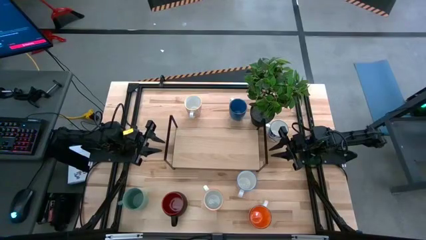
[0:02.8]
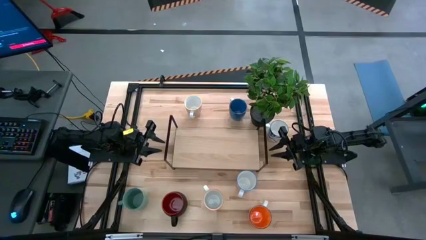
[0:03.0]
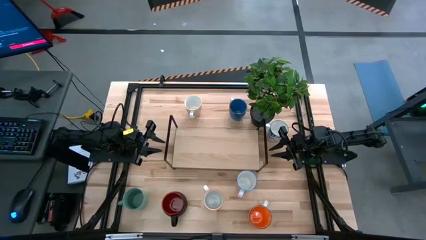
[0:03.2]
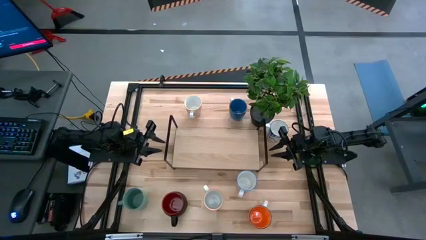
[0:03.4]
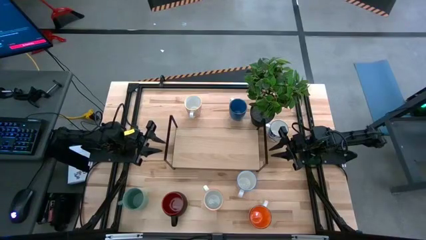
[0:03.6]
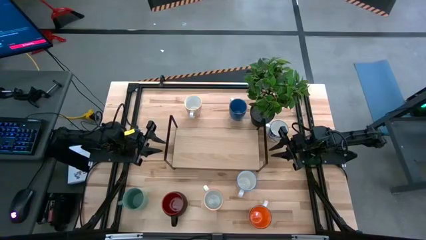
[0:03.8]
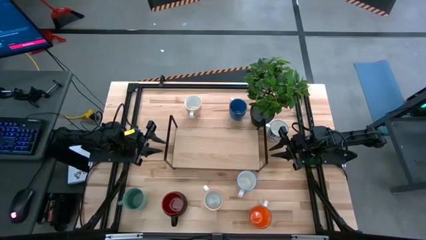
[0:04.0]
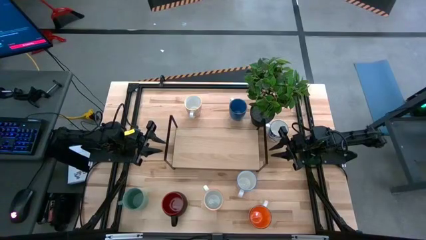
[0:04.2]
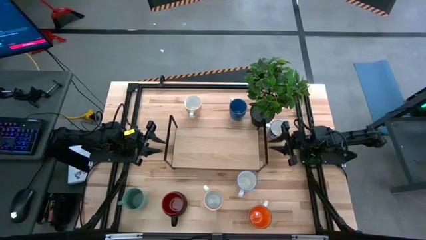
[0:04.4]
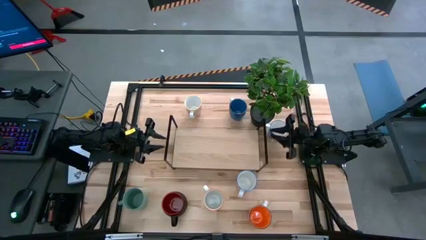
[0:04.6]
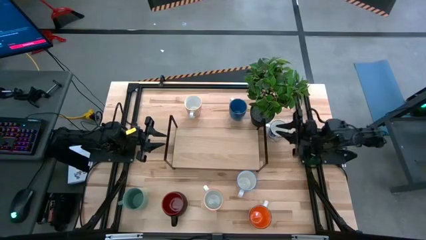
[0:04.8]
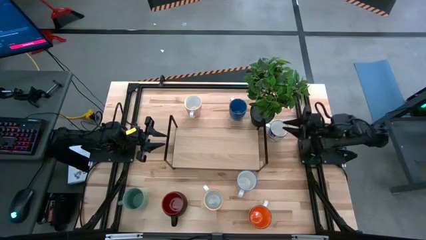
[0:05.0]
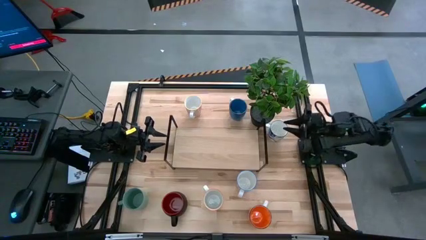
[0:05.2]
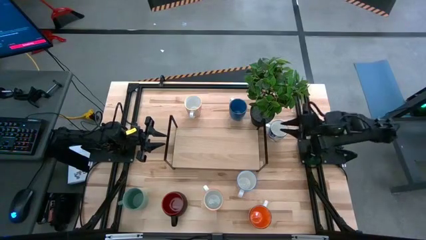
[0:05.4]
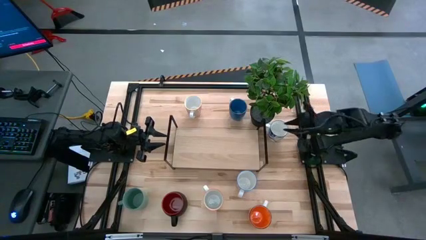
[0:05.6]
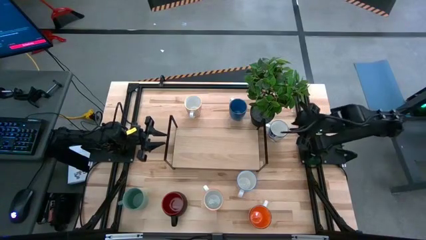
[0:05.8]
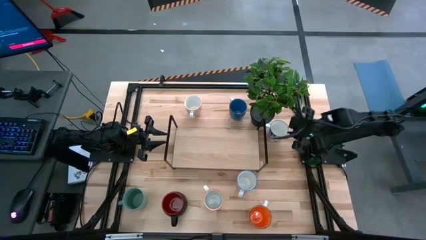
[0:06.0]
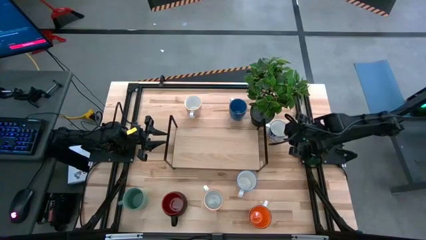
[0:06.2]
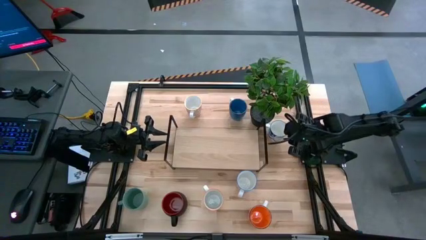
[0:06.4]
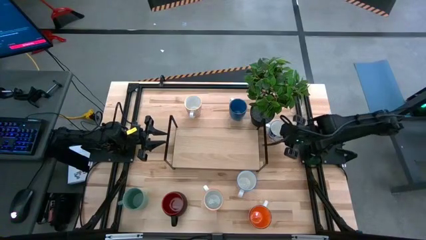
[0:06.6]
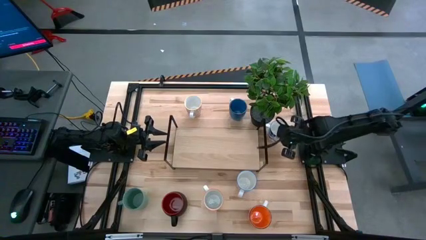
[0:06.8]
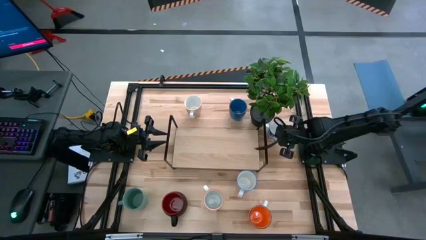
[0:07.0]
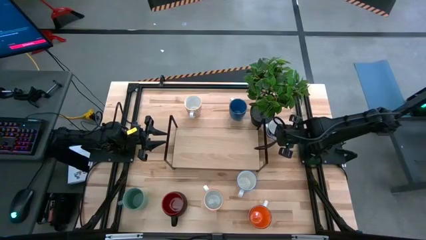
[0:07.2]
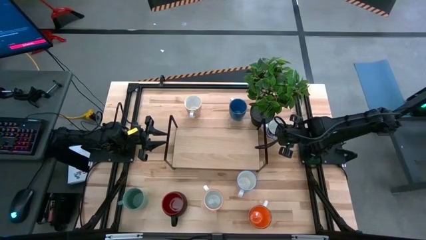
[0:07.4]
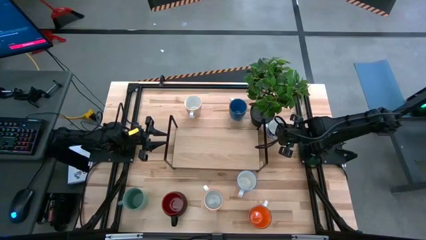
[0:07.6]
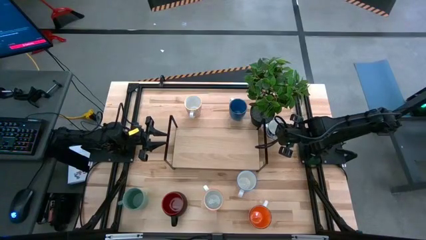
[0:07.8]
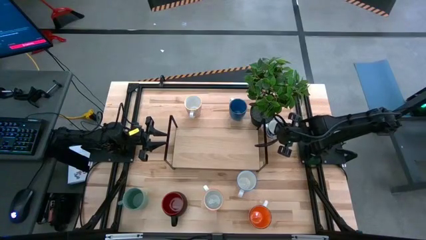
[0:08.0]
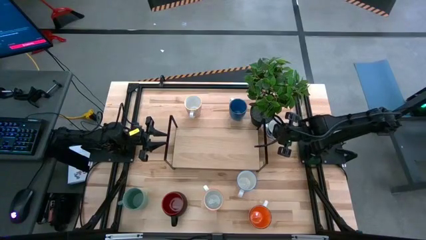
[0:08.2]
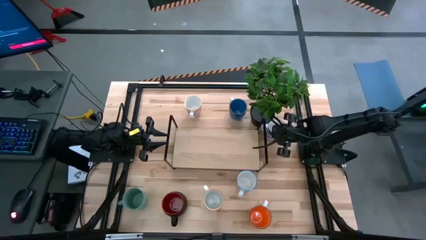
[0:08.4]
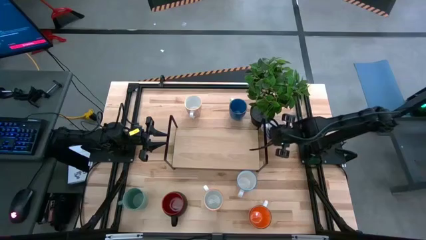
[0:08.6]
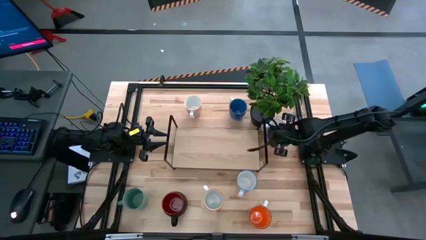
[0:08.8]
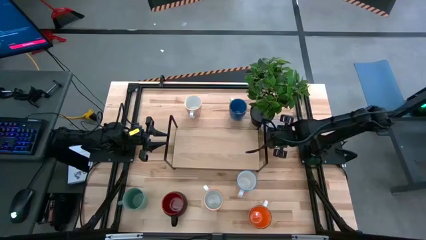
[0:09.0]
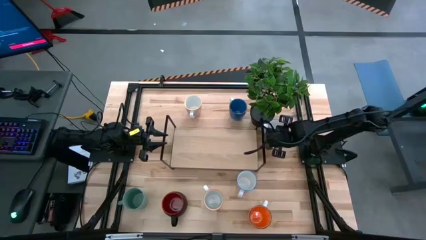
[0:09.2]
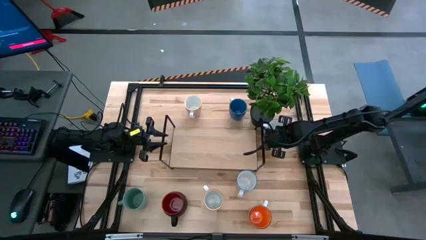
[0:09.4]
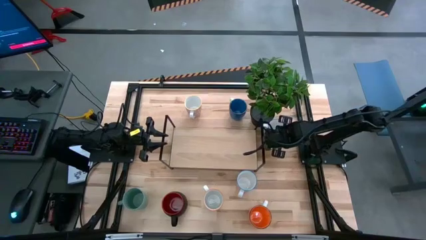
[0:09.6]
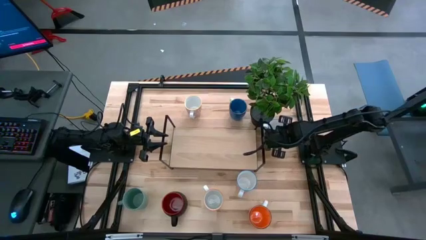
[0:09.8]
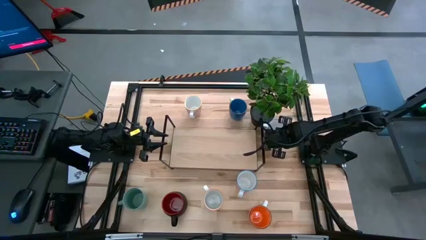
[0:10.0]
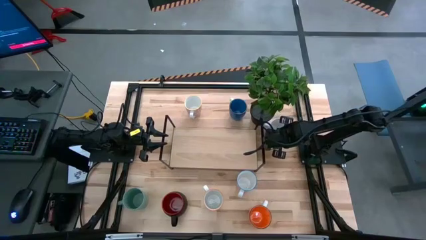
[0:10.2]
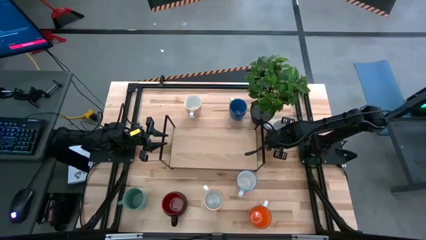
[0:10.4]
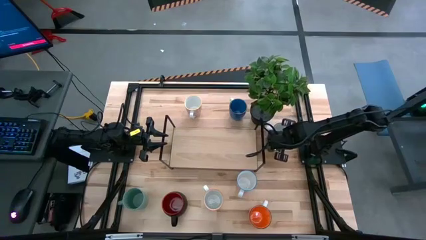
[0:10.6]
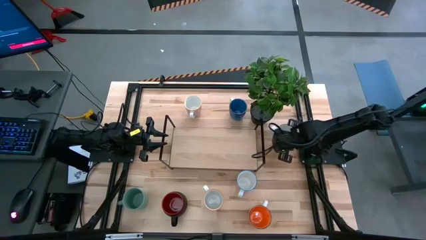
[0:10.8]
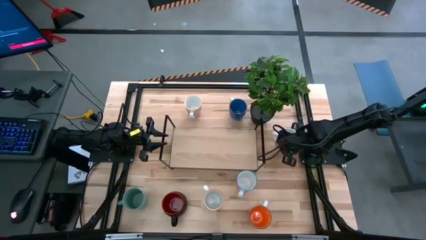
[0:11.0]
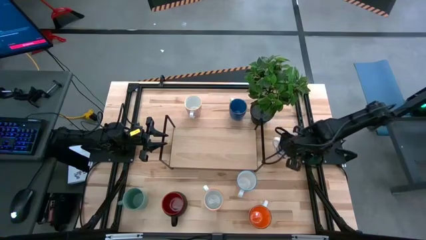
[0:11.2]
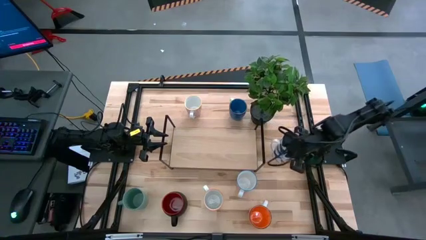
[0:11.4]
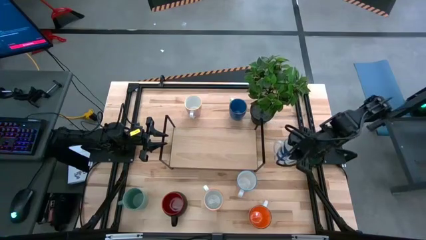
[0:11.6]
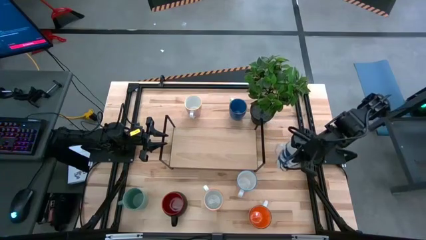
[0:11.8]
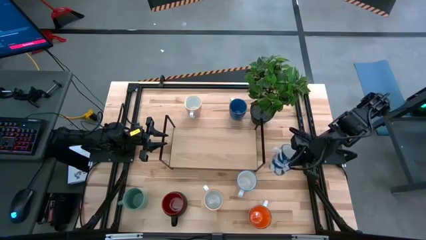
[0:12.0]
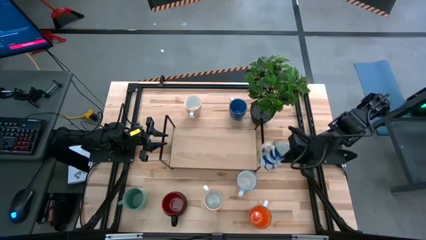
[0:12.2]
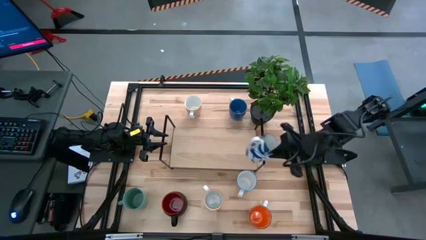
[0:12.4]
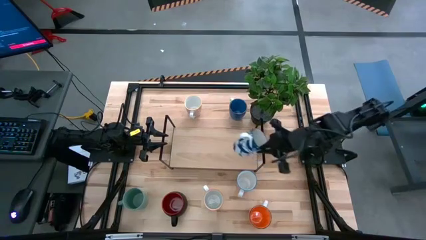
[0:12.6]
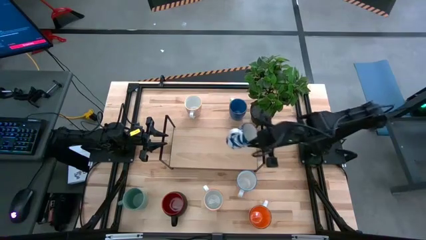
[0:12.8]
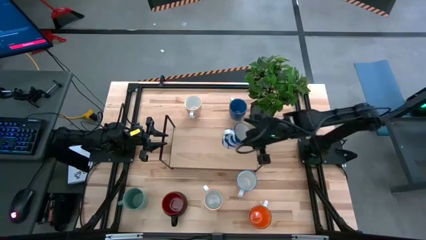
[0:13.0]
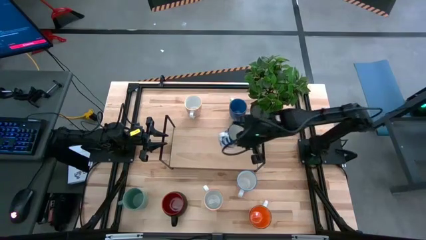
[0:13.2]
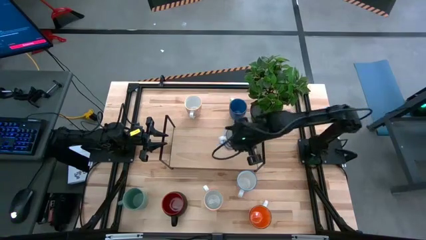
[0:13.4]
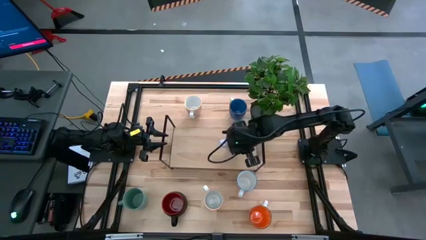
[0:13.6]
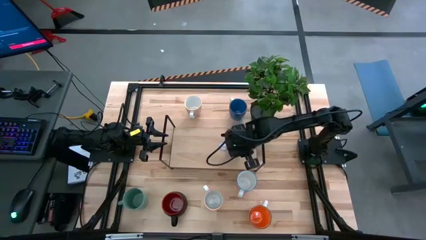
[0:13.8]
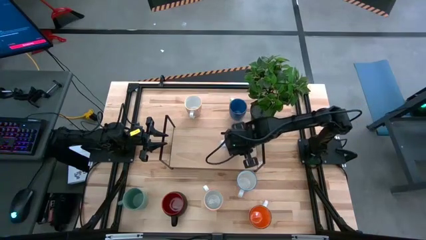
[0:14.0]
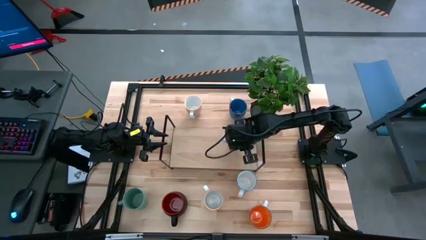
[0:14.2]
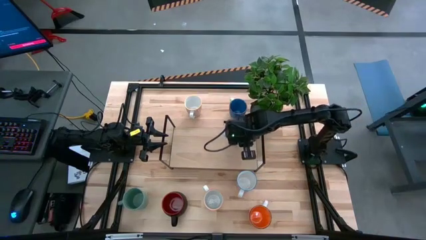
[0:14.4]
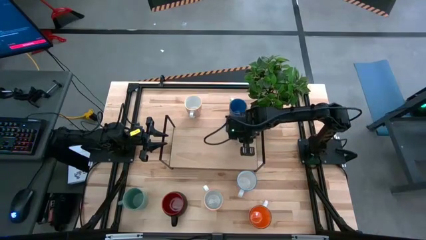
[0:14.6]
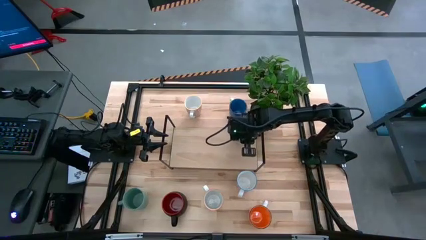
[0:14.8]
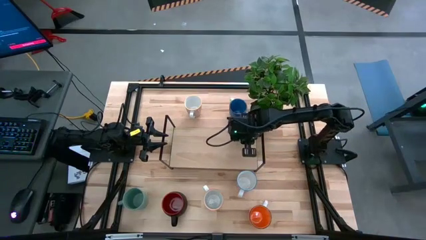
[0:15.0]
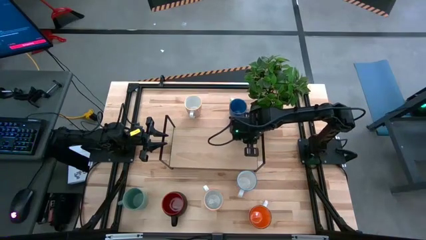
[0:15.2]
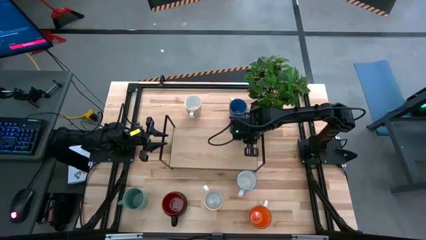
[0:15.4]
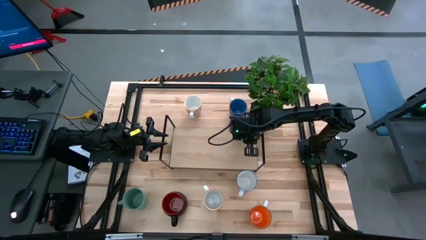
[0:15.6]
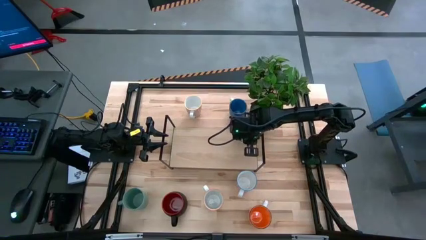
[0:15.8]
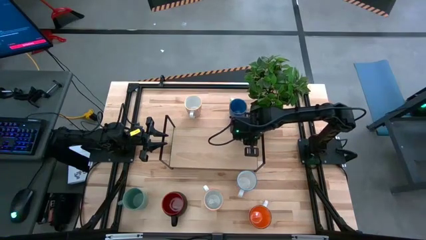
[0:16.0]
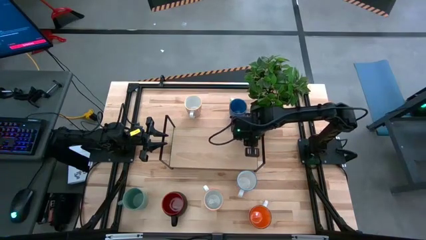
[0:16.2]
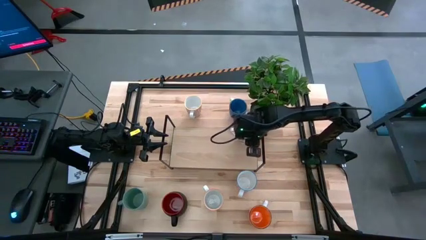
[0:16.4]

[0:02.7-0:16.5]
Task: Place coffee mugs
Put the blue and white patterned mug on the shelf
